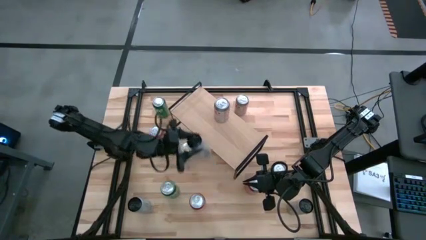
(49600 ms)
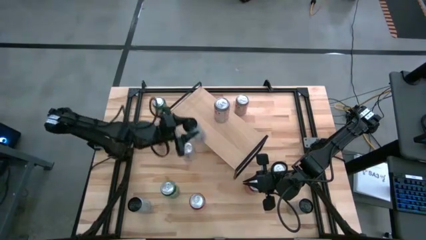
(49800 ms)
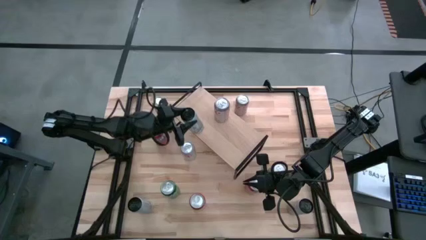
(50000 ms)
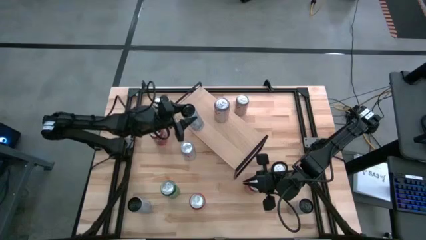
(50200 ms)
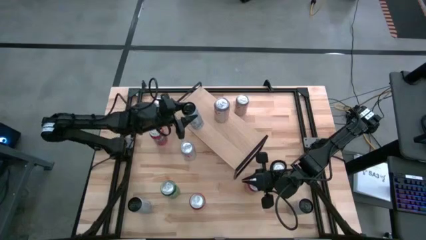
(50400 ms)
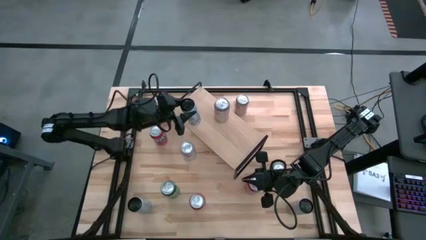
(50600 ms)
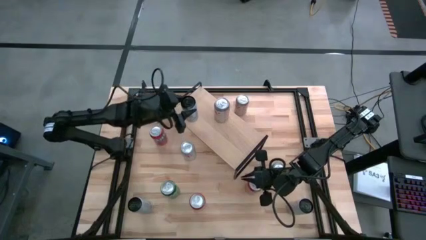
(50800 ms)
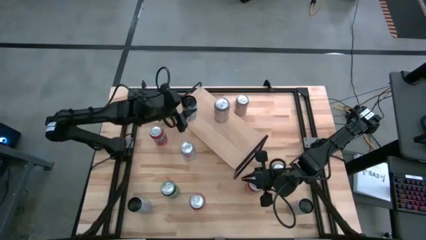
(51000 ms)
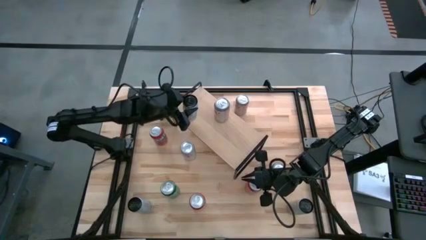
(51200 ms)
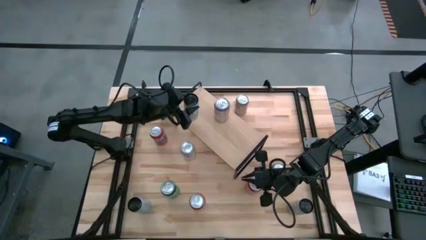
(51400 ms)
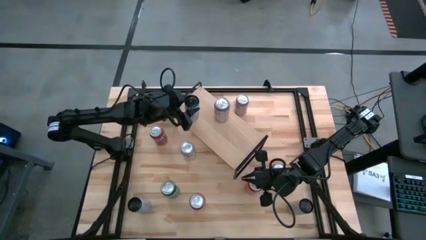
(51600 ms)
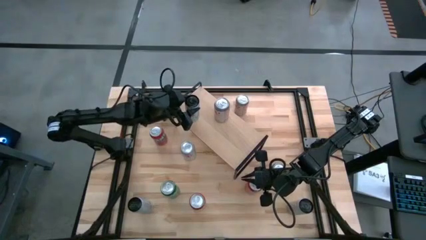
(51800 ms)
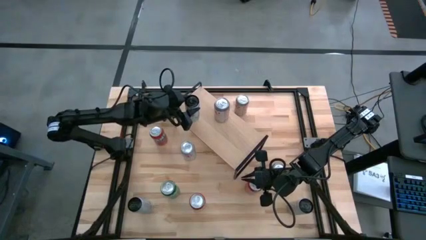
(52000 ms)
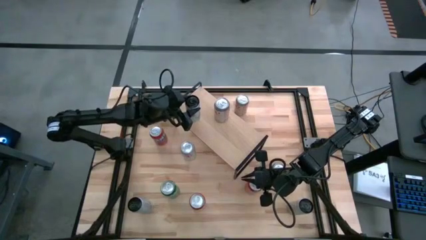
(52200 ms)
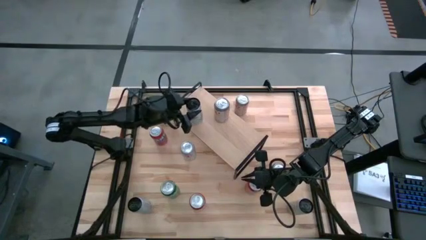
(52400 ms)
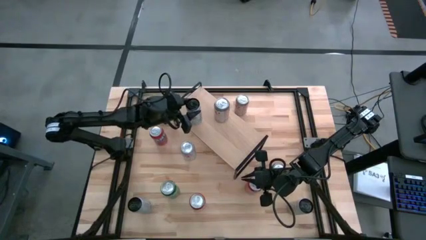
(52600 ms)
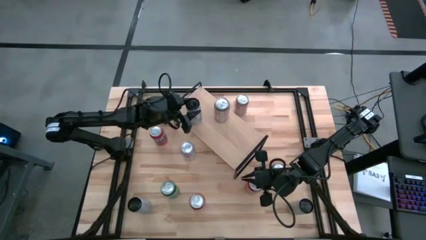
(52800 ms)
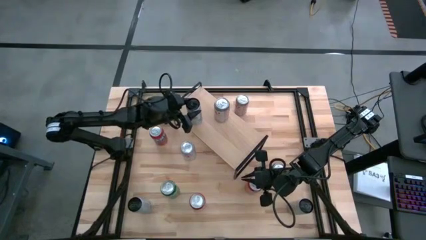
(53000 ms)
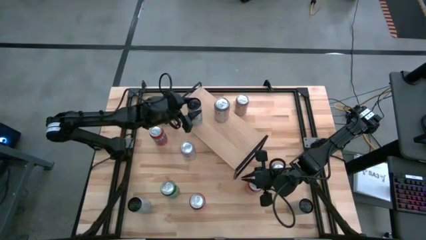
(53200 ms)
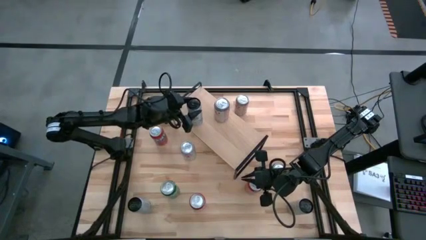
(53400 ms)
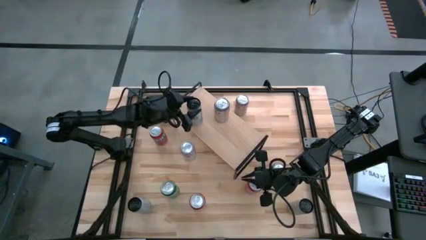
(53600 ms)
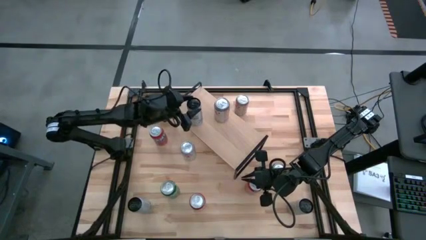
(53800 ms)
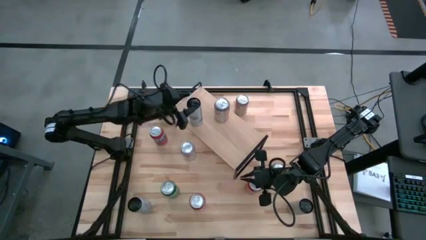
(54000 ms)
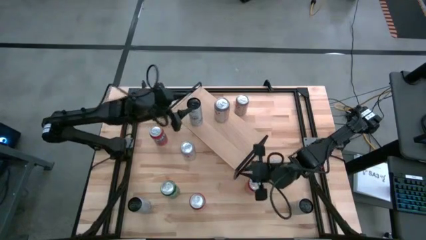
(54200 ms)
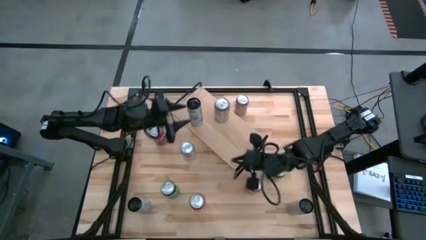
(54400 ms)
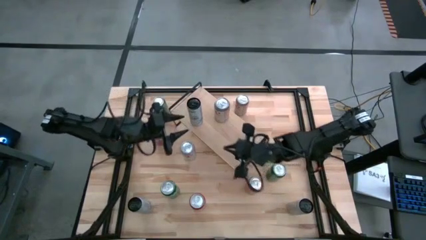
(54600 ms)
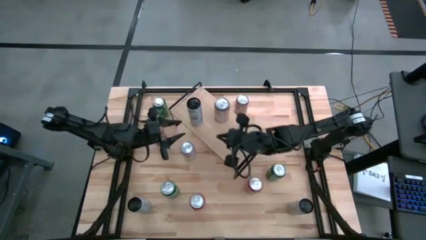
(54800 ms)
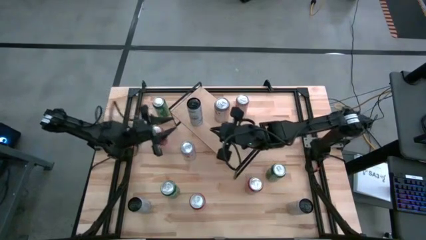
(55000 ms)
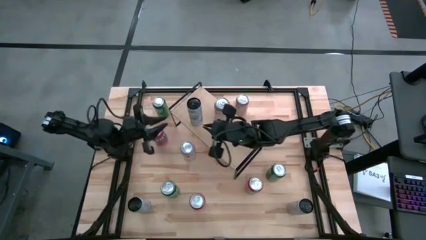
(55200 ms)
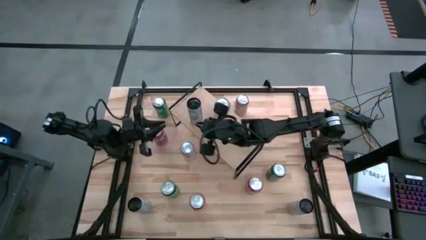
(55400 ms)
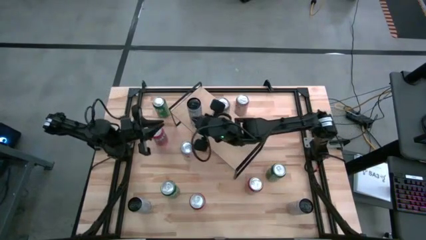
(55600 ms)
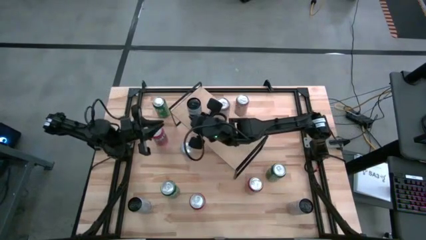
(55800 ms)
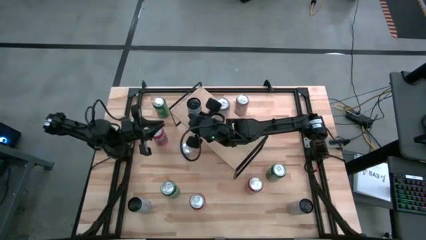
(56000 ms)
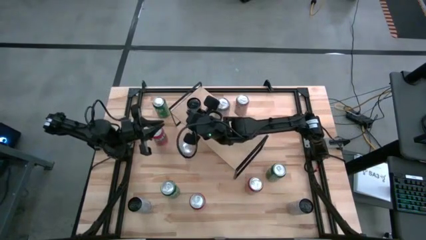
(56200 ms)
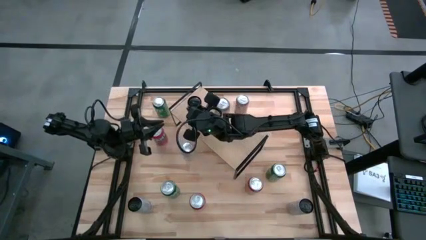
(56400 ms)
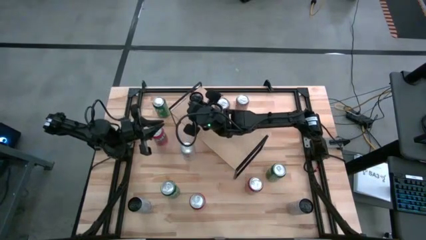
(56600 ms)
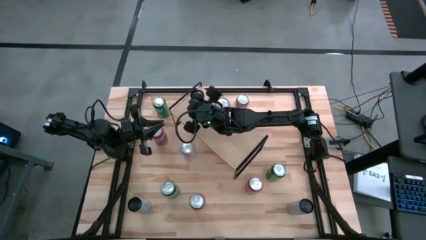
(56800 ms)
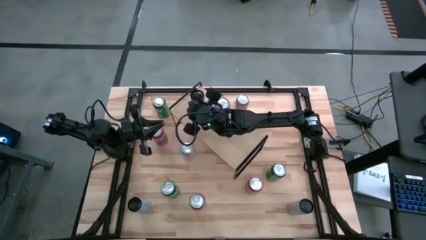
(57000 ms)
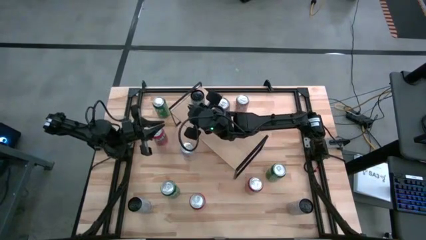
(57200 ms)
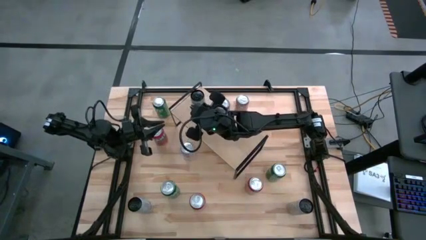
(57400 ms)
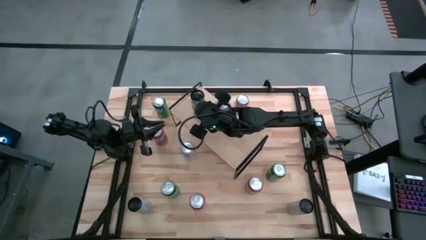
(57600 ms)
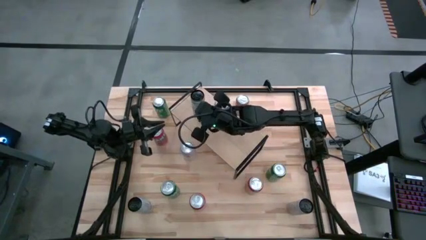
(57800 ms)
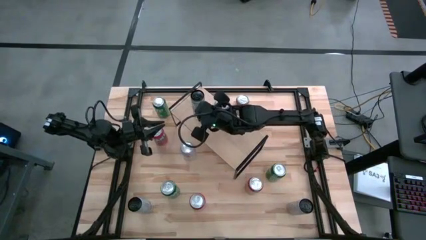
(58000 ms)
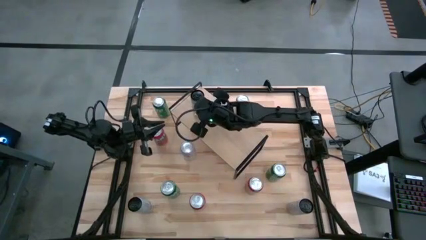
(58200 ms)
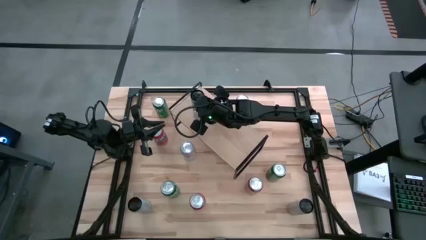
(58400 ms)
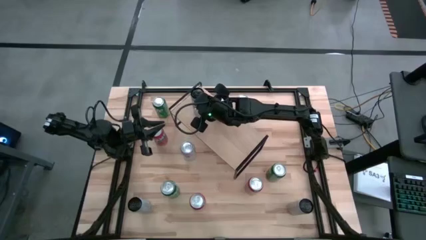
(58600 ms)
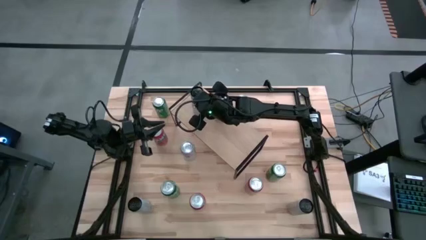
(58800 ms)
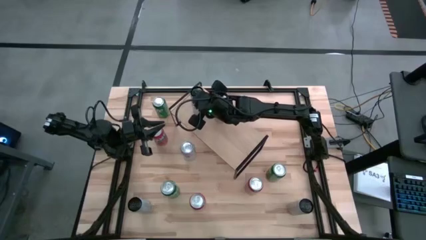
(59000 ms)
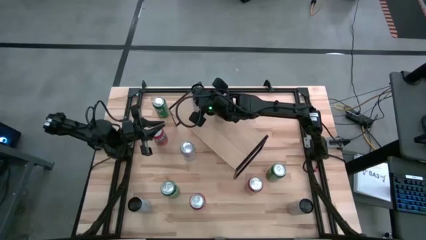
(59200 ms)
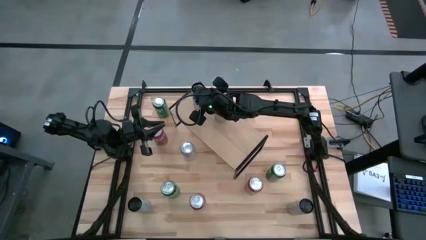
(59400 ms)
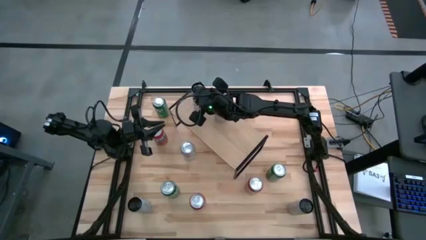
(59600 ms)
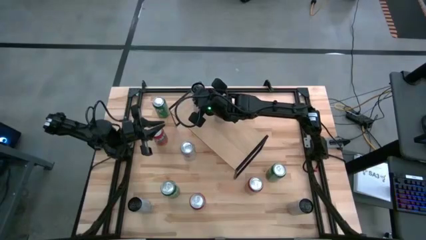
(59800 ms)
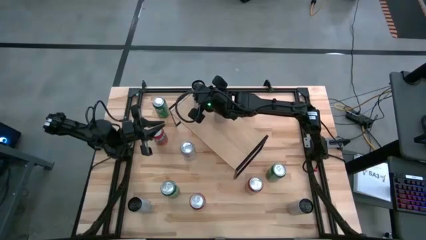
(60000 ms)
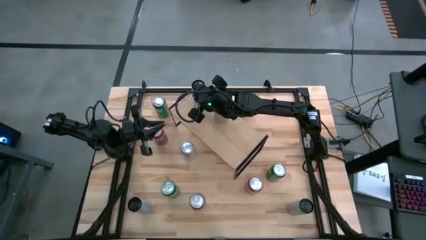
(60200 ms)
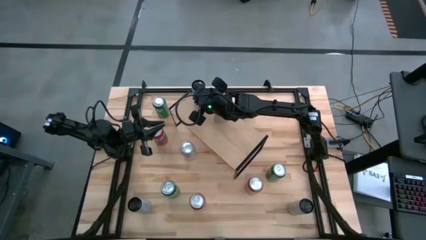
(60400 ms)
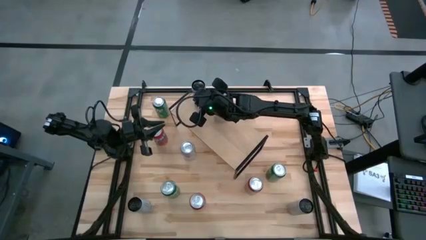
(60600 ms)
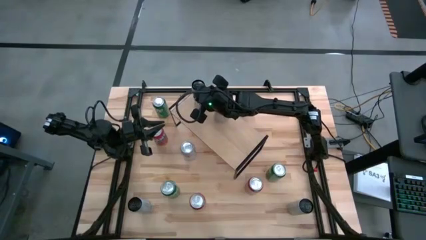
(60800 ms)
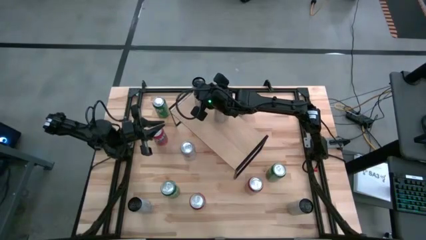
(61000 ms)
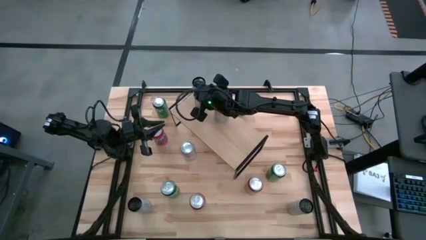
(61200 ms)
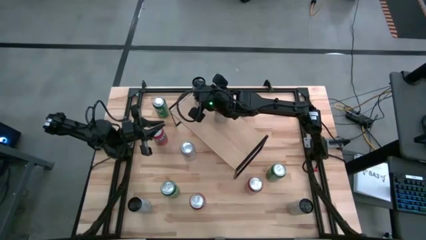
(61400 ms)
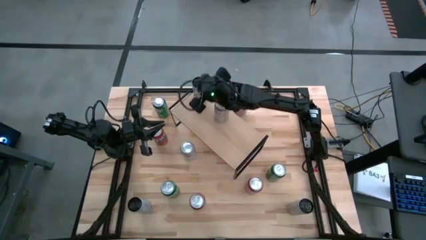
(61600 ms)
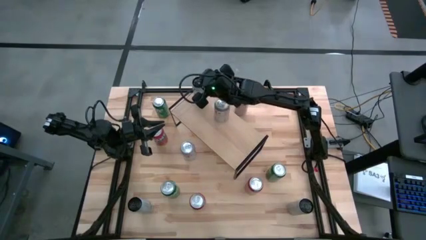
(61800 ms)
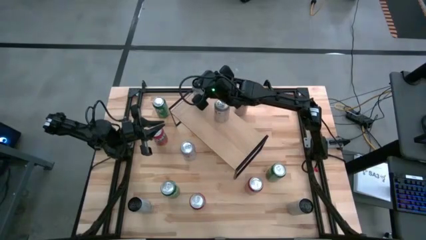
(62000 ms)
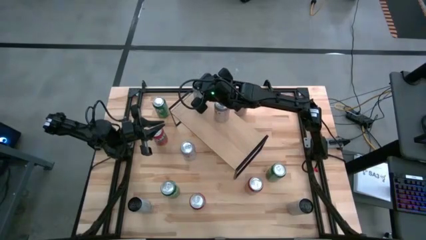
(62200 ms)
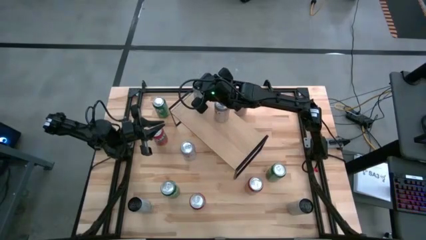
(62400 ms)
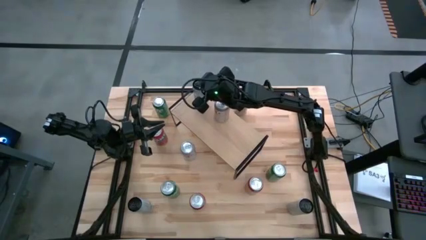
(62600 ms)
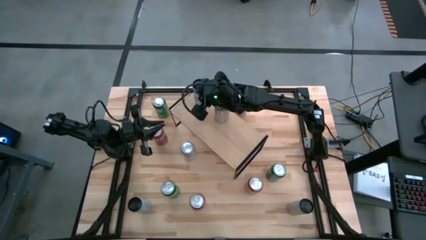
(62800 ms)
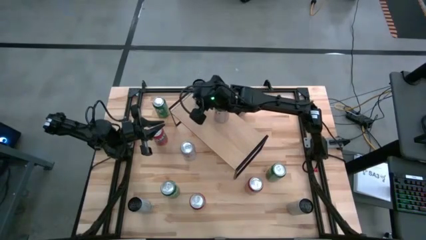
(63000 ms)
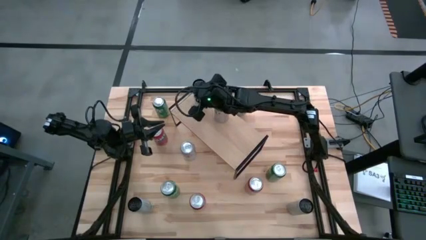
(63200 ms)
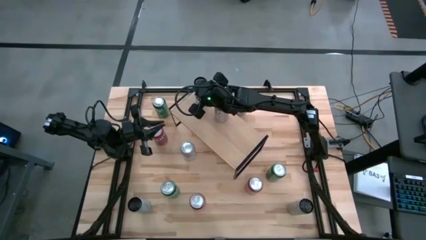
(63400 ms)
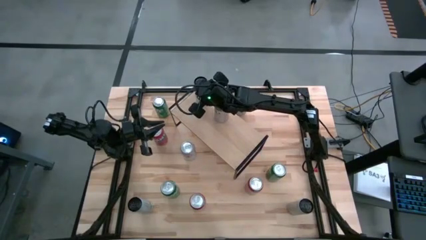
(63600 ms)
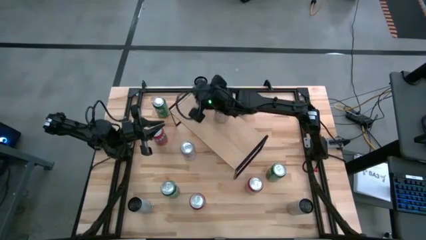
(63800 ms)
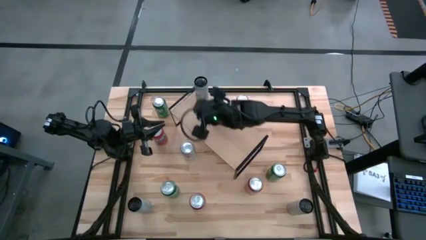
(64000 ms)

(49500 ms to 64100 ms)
Task: Place canned beverage on shelf
Put the top blue soda can on the shelf

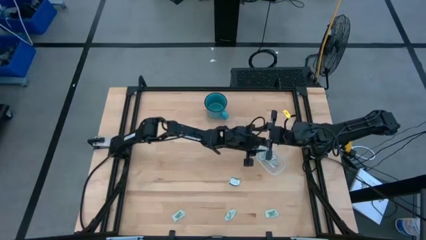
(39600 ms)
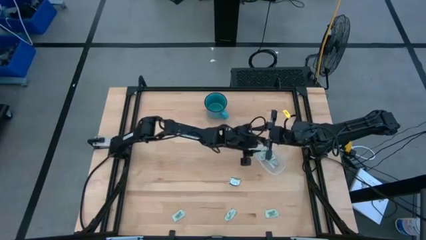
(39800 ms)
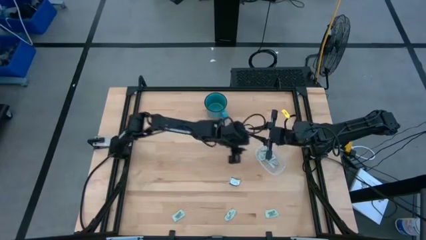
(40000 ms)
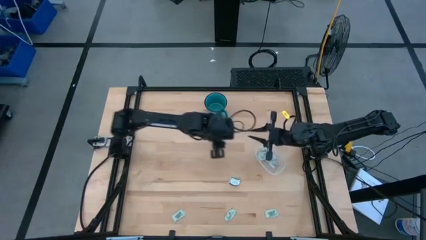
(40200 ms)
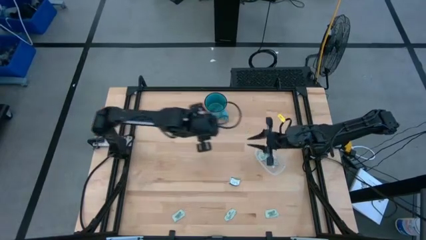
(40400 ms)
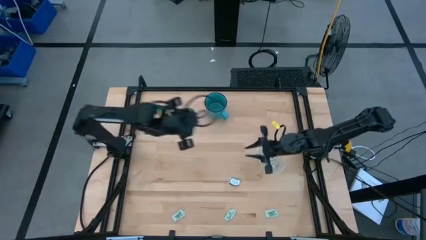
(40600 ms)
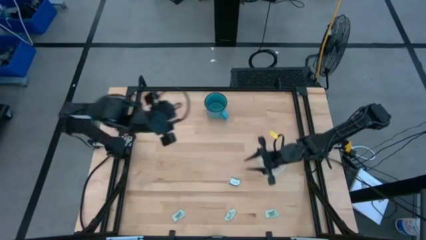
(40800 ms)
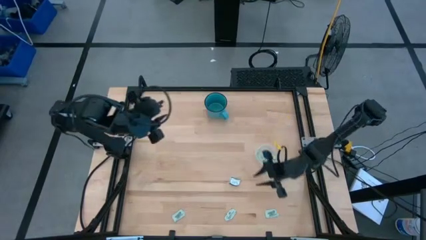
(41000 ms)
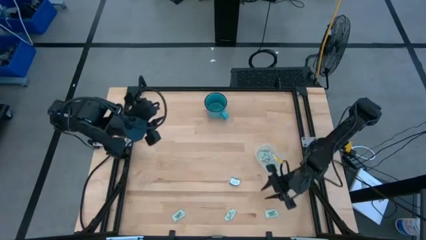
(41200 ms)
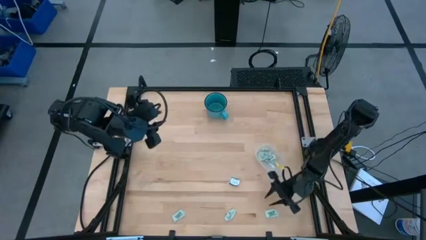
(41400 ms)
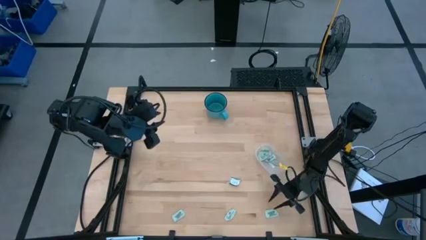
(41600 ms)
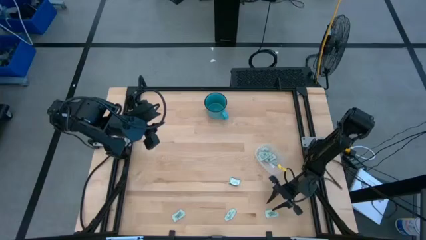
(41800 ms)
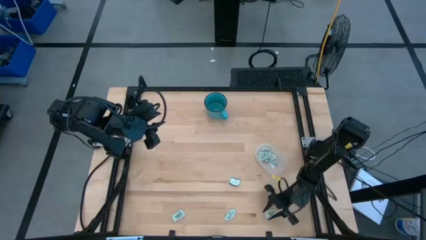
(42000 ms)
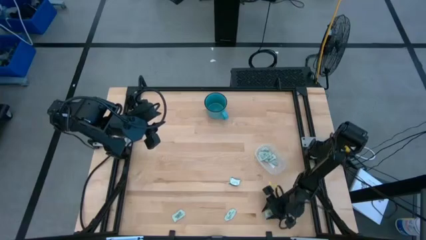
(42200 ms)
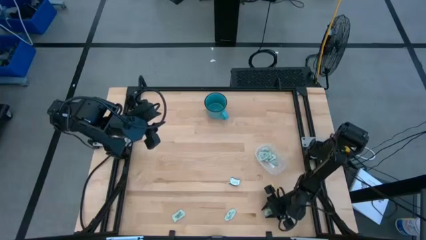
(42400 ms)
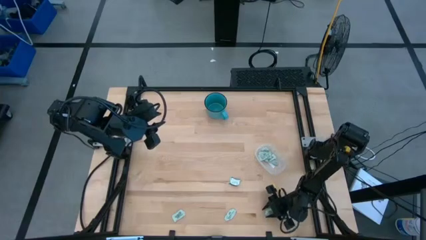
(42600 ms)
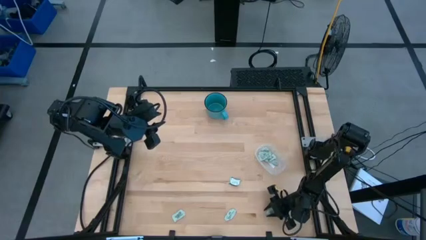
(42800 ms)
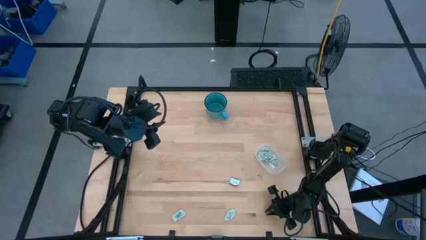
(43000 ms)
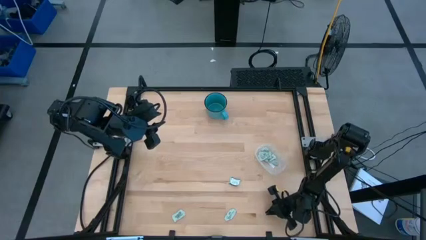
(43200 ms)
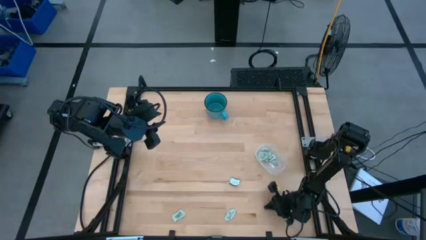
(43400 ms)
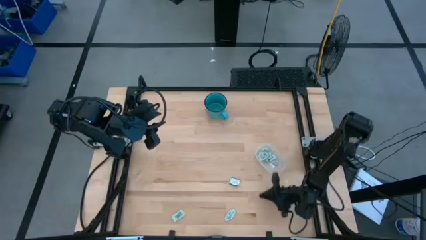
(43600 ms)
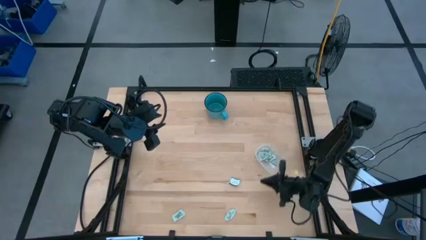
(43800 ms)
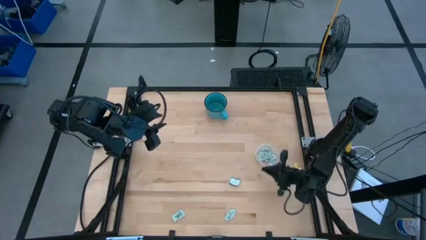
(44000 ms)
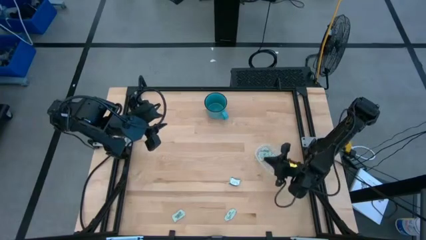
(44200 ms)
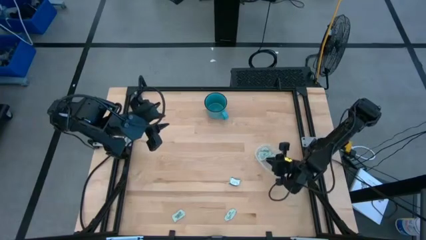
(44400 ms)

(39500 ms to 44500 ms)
Task: Pick and place Stevia / Truvia into bins
Put the white stevia packet into the transparent container
